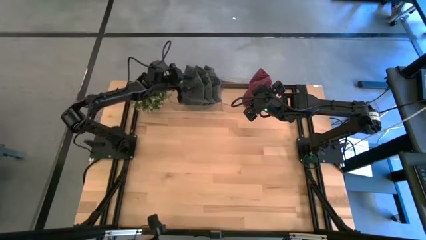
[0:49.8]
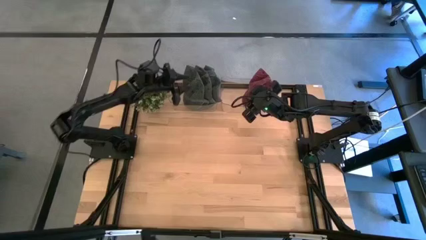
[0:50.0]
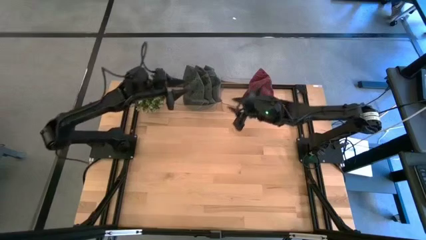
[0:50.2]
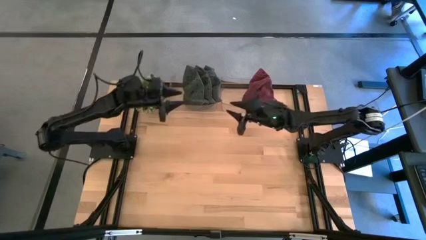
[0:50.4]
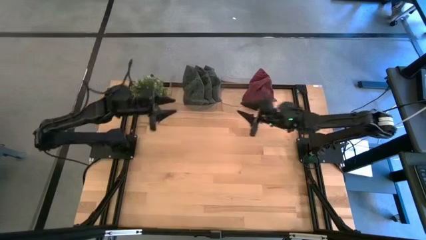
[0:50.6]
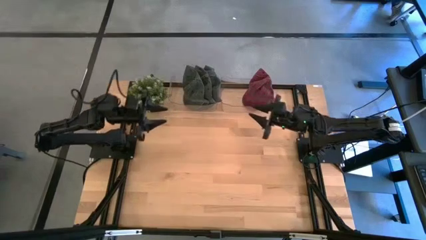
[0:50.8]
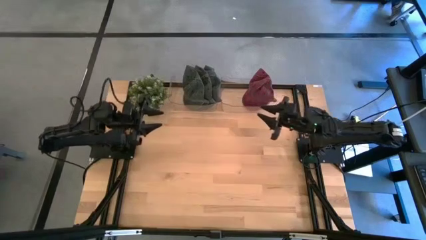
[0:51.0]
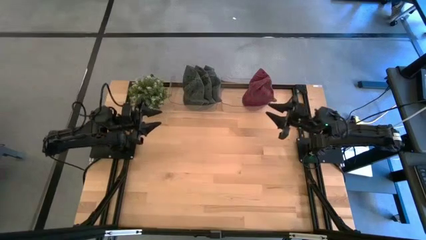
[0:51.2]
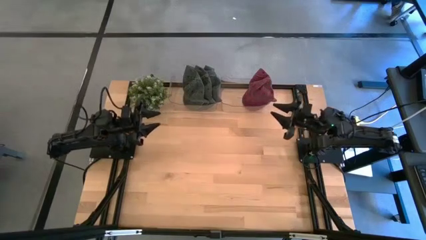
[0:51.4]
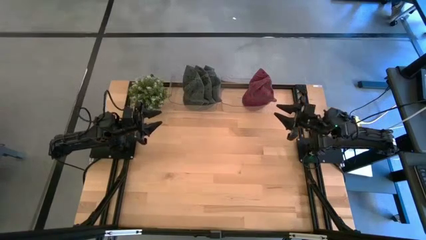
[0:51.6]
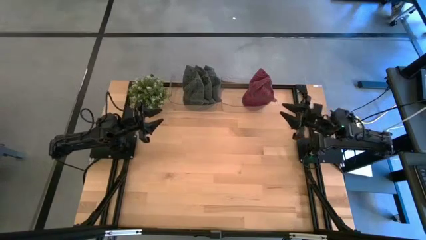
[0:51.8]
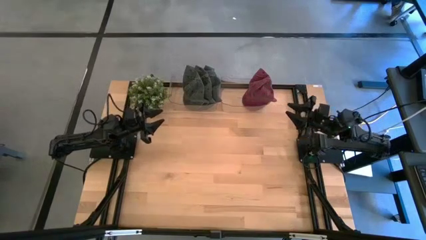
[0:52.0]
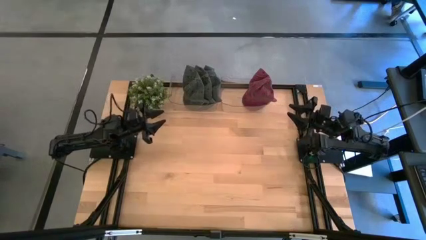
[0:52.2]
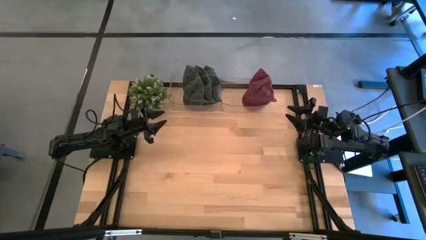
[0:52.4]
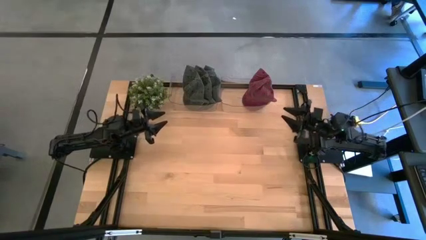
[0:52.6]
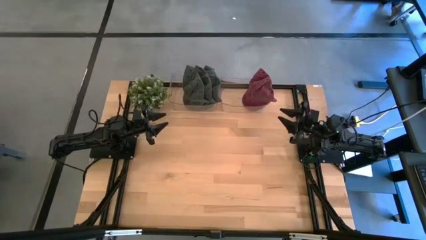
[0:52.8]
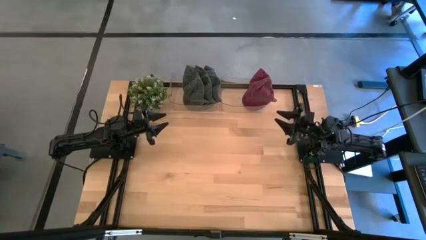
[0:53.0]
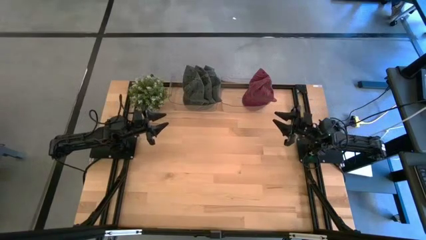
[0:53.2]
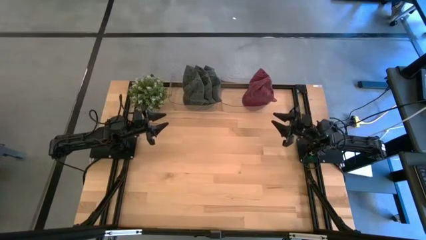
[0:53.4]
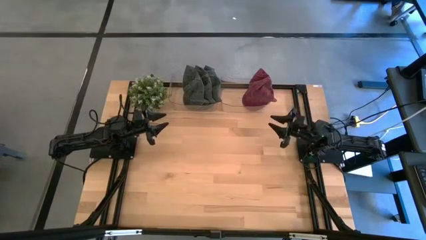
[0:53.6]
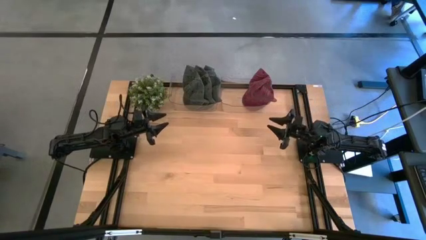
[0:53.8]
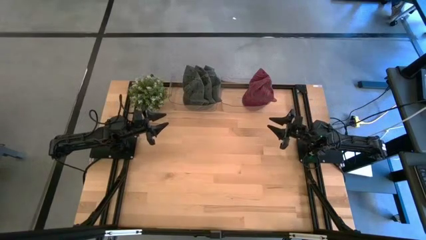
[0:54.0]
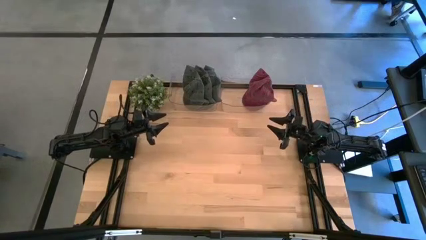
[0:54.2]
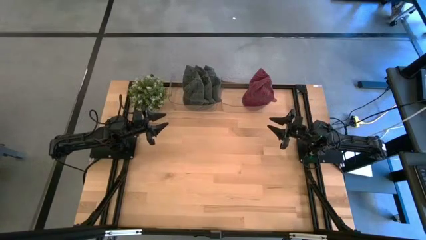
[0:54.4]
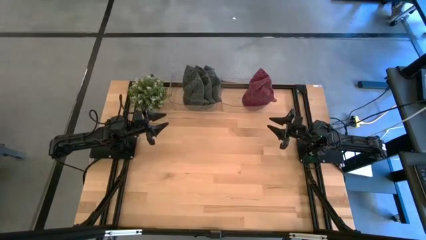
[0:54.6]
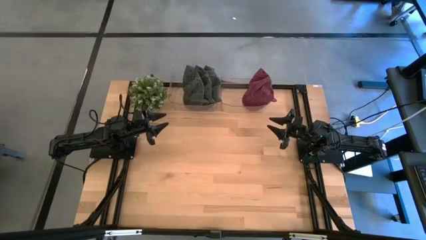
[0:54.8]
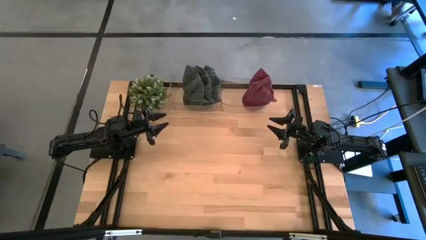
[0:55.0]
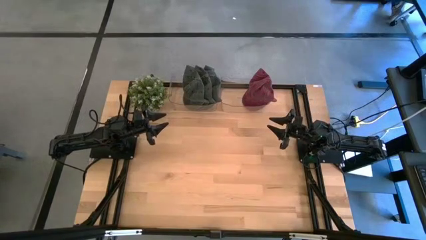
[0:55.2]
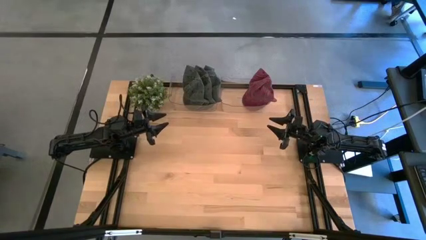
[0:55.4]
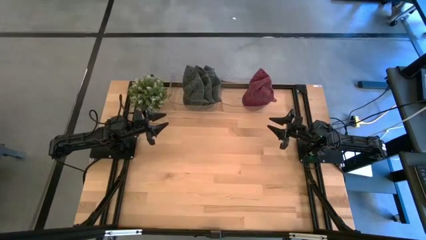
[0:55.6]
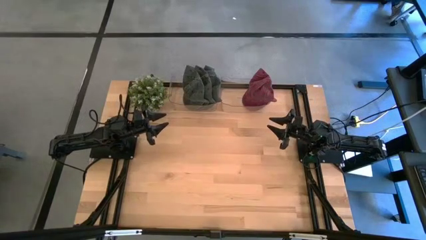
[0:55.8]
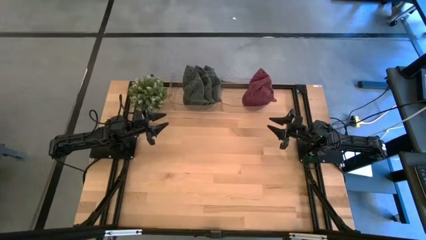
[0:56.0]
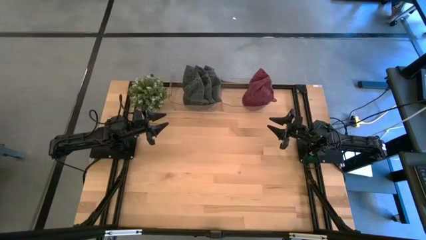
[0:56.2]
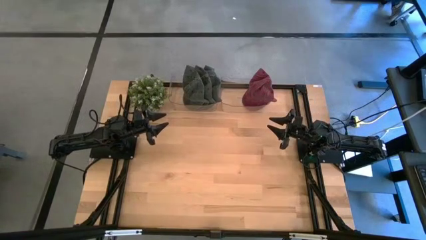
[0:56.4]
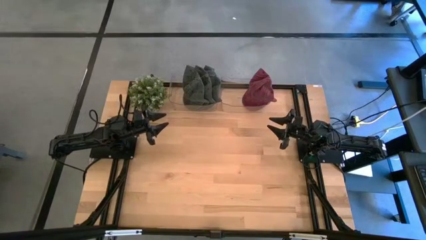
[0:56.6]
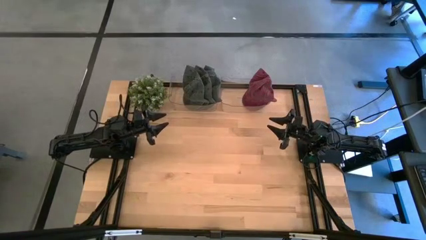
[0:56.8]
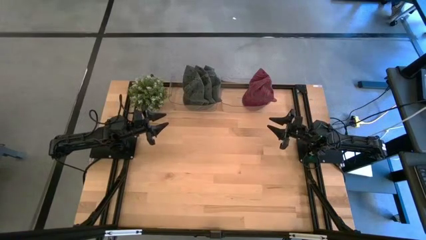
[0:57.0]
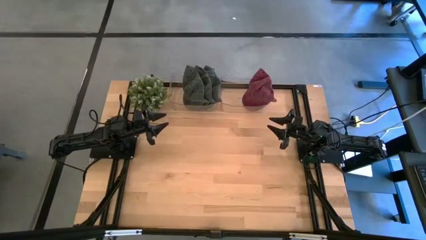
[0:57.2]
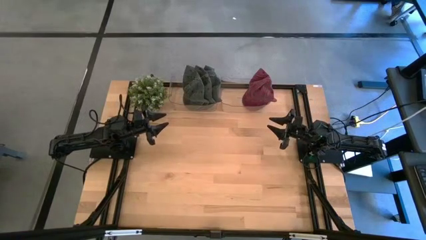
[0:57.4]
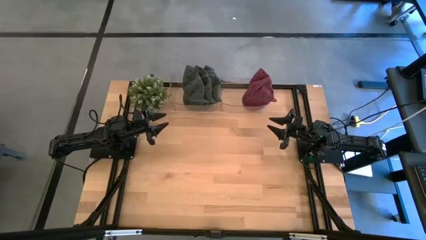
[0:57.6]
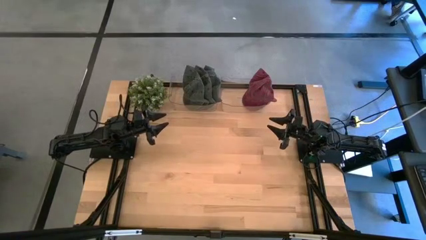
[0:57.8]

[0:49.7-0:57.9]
Task: Pick & Place hat
Return to Home Position

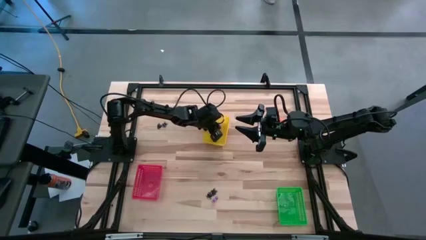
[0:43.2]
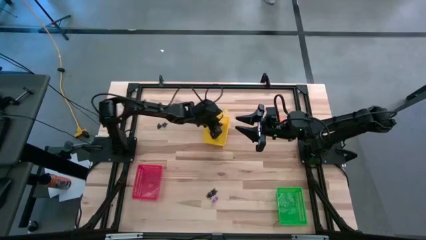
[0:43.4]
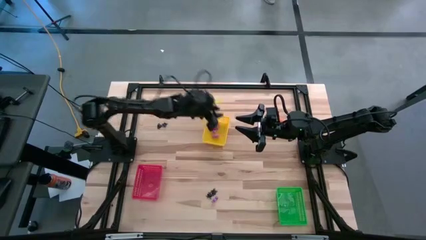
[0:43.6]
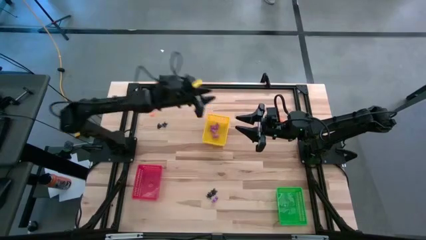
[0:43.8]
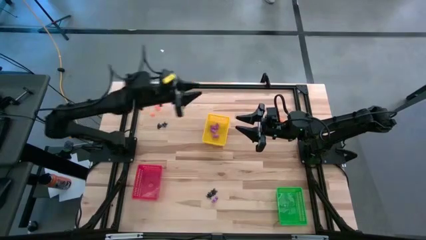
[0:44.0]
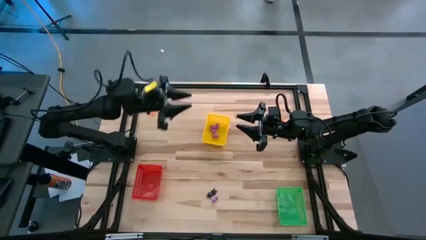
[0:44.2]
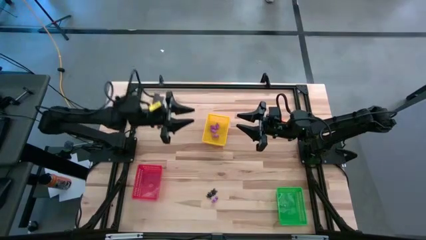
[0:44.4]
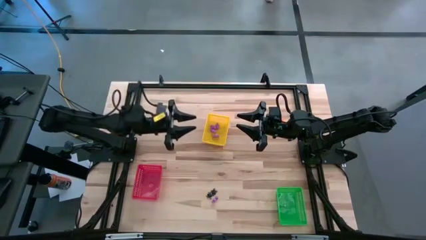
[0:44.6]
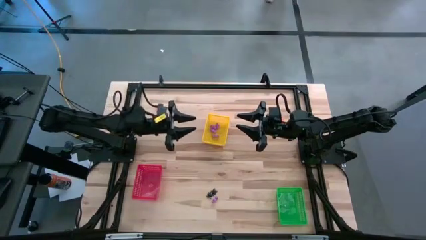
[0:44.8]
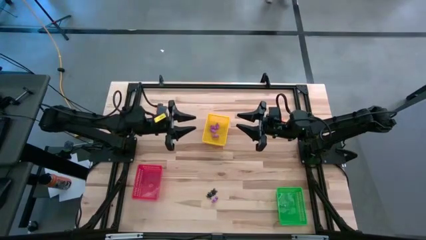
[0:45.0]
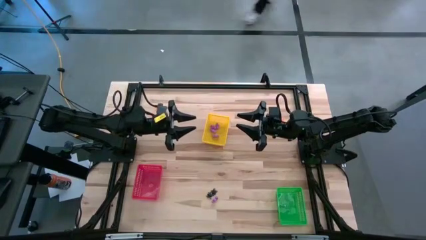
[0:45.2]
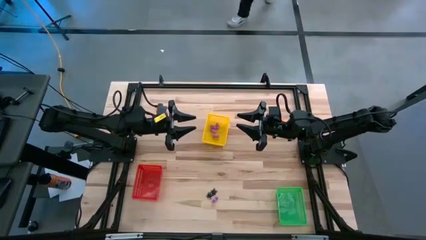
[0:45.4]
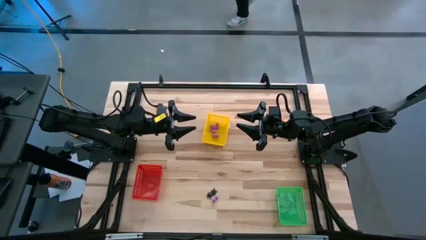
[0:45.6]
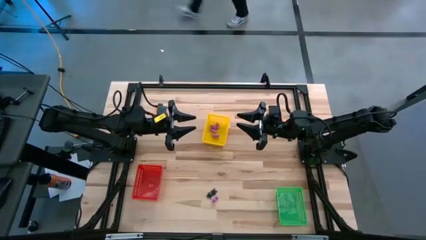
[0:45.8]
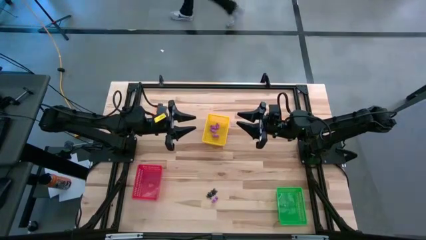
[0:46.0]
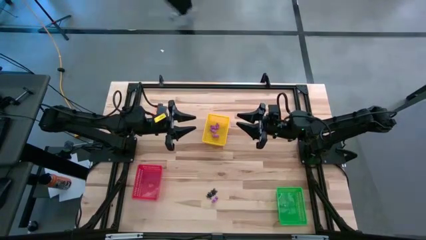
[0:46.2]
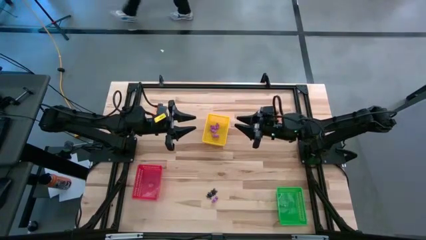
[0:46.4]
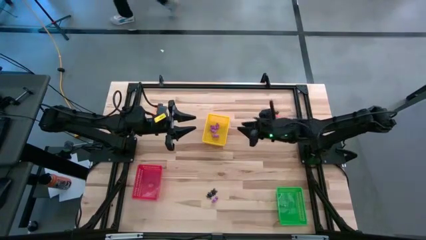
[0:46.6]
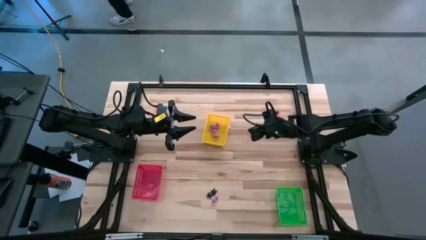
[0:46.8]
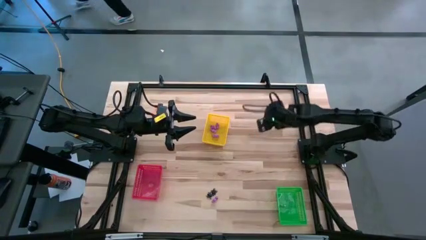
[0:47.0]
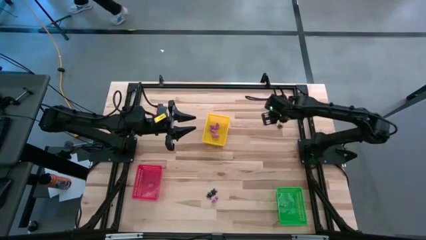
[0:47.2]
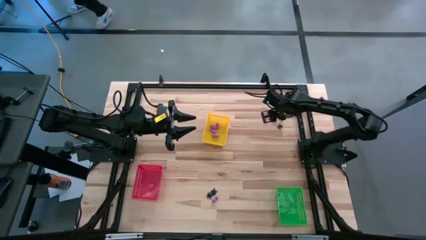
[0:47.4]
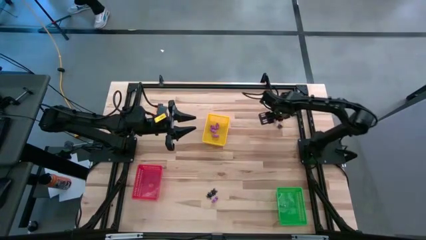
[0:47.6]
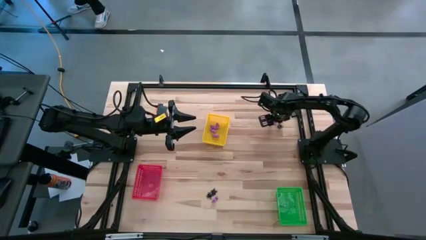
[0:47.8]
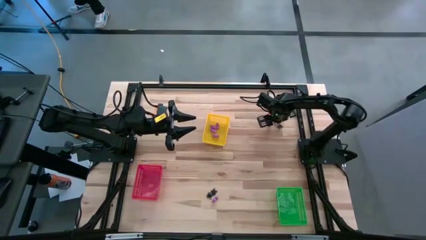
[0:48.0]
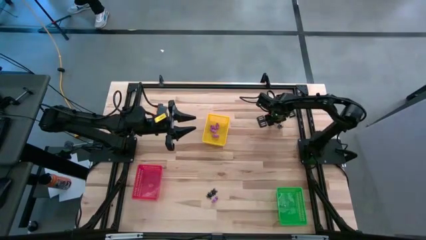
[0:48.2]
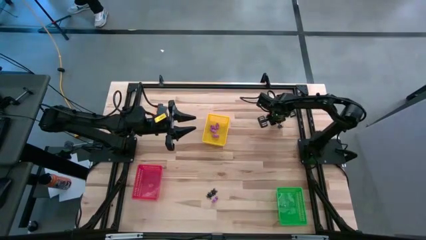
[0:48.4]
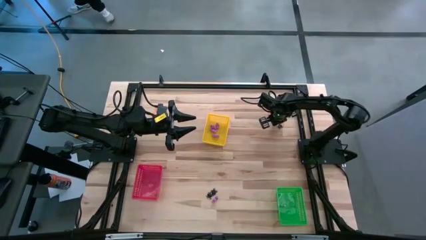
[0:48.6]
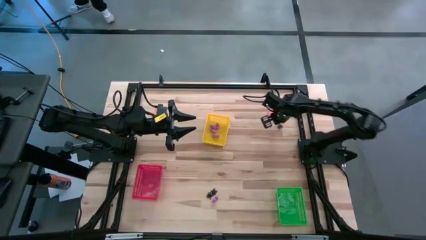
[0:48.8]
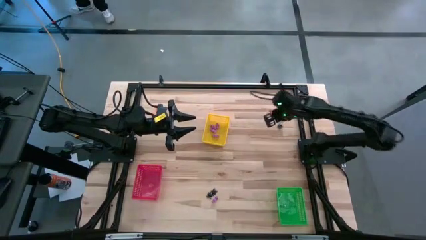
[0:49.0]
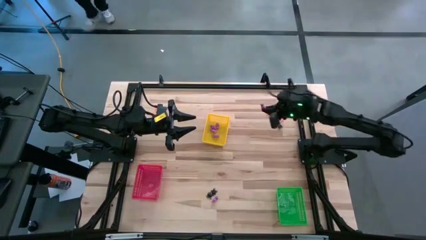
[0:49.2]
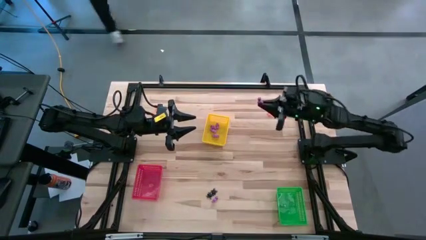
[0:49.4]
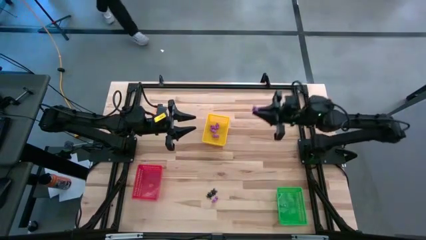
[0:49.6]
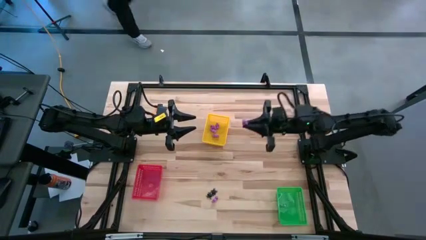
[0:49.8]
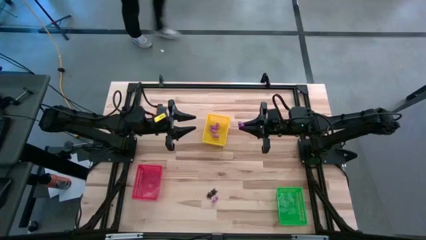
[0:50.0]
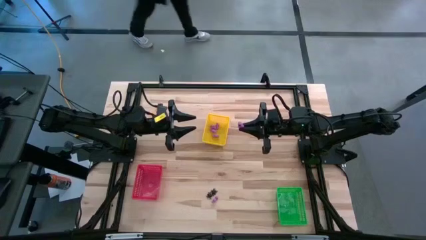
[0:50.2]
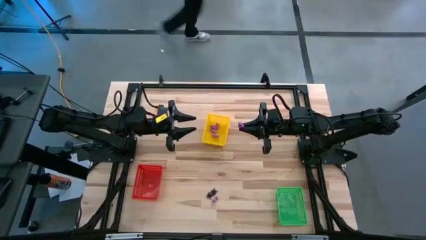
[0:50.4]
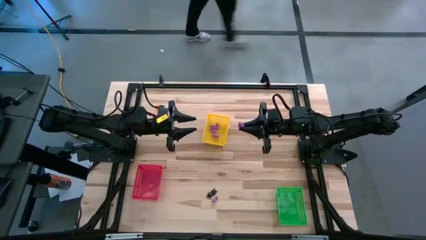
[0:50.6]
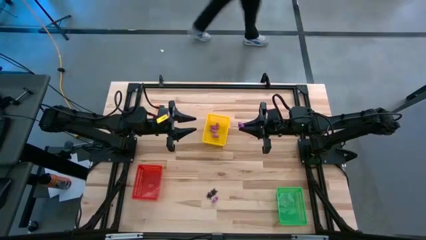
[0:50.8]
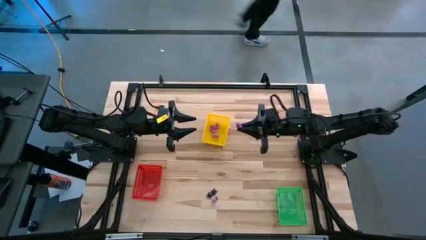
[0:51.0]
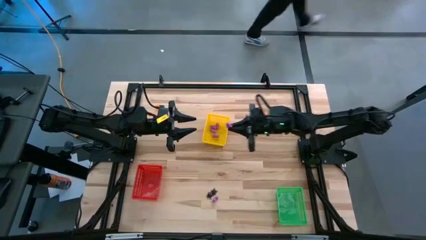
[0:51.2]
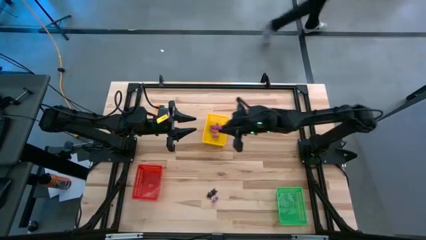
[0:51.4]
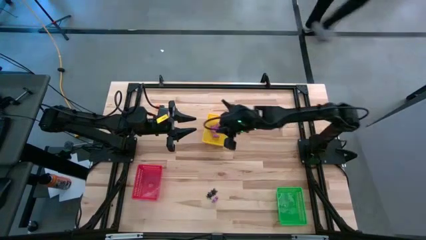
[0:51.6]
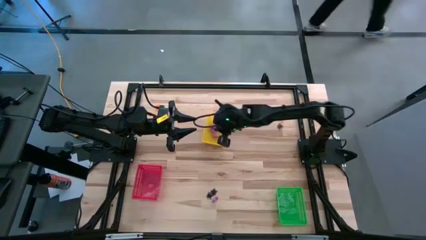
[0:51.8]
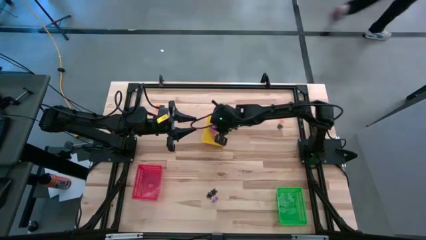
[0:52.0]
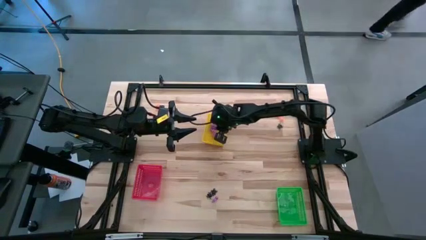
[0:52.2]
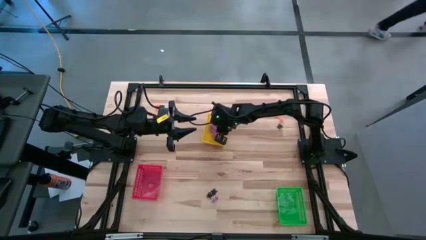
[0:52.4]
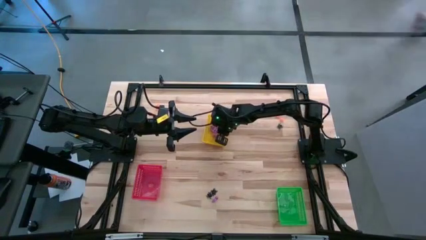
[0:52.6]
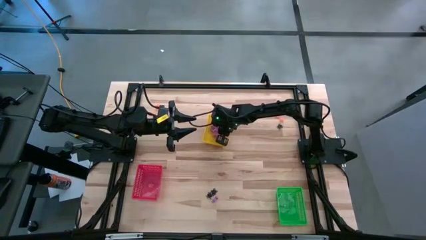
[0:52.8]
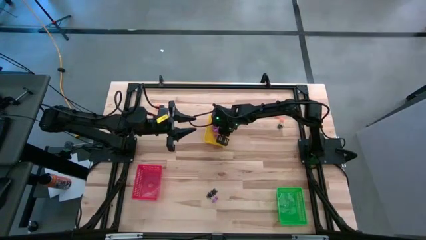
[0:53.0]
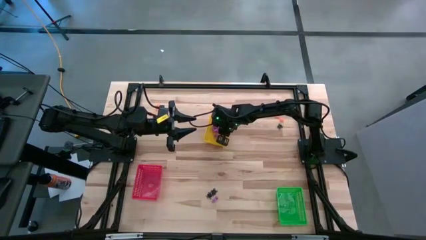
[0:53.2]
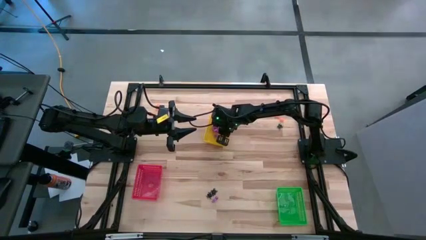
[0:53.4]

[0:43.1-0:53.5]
Task: Sort Halloween decoration
Put the top skeleton toy into the yellow bin
